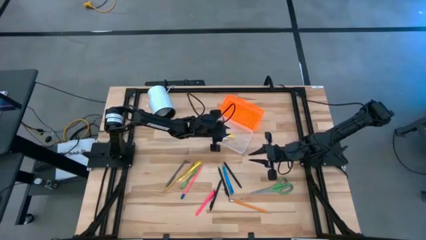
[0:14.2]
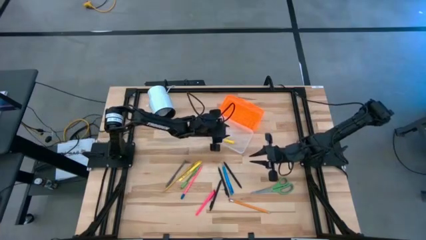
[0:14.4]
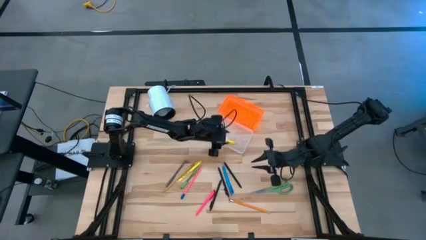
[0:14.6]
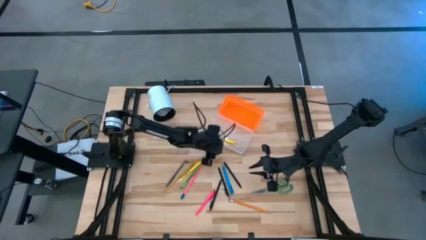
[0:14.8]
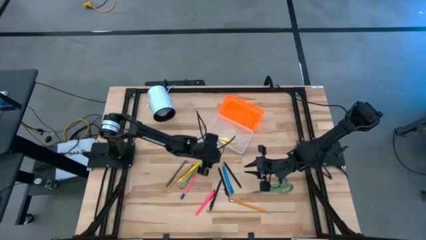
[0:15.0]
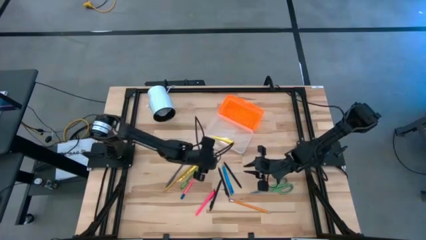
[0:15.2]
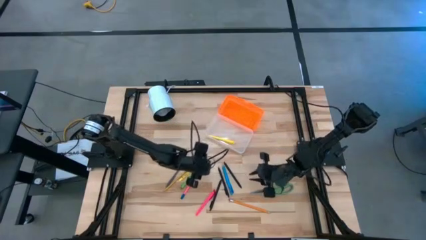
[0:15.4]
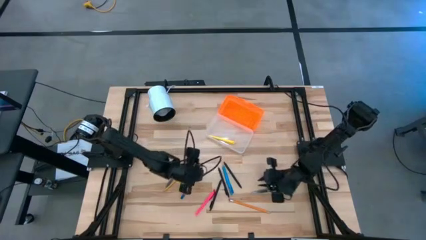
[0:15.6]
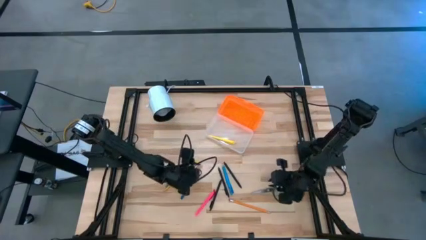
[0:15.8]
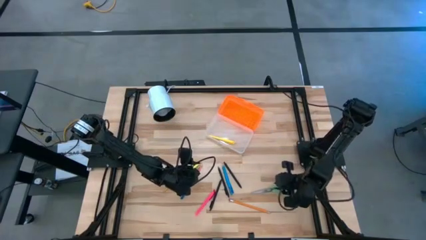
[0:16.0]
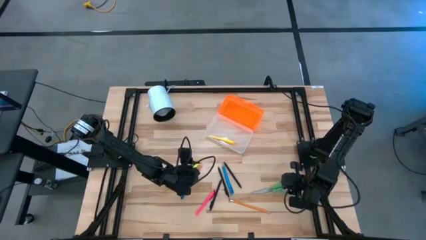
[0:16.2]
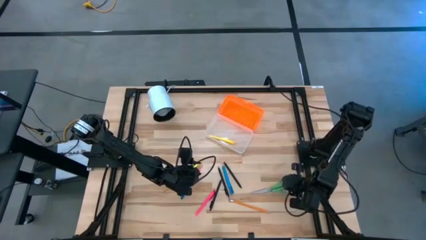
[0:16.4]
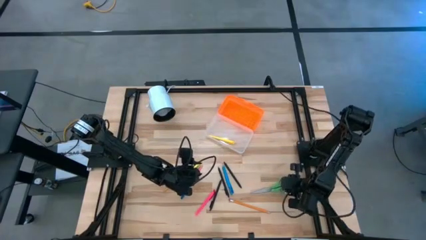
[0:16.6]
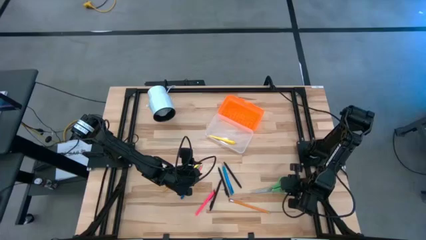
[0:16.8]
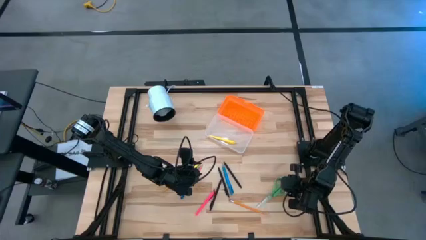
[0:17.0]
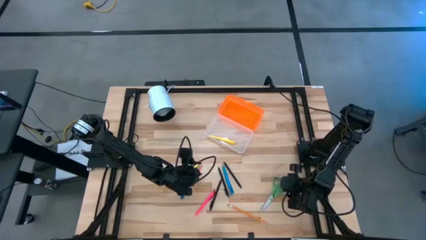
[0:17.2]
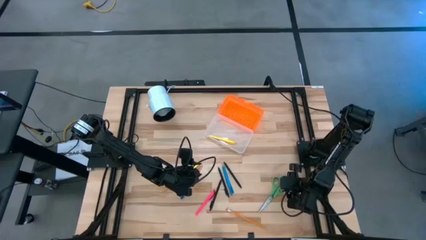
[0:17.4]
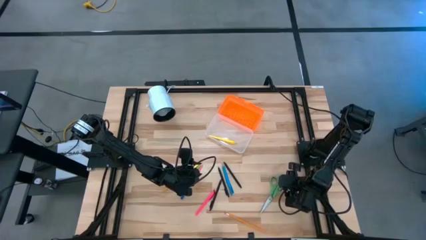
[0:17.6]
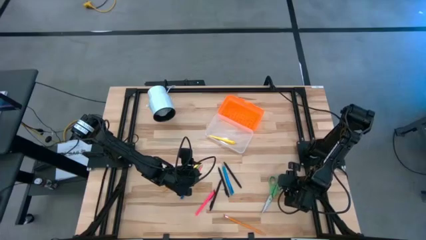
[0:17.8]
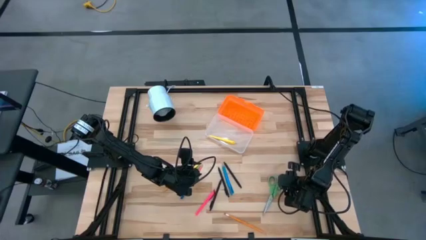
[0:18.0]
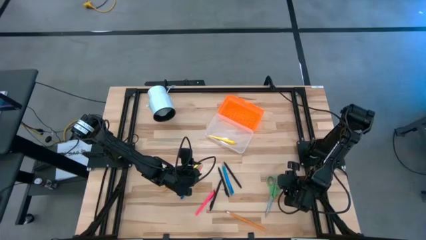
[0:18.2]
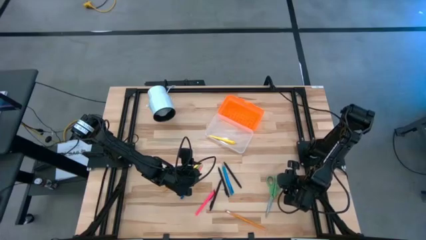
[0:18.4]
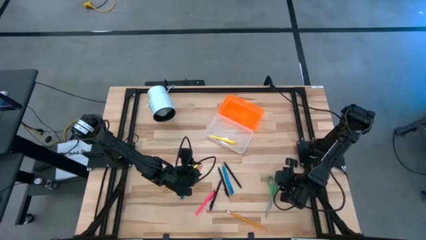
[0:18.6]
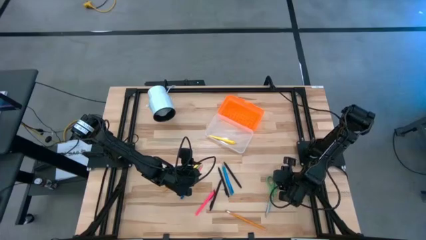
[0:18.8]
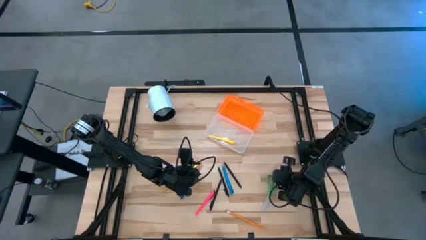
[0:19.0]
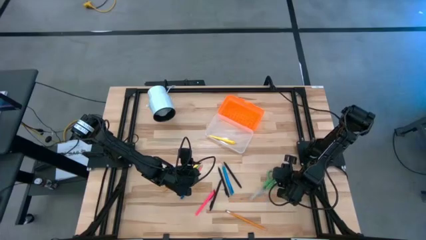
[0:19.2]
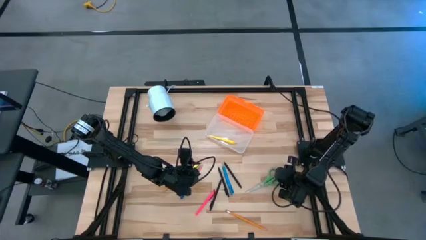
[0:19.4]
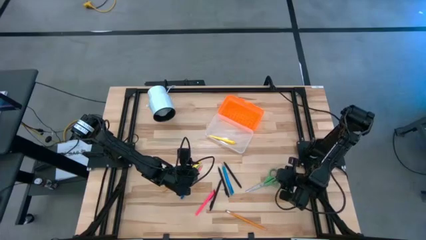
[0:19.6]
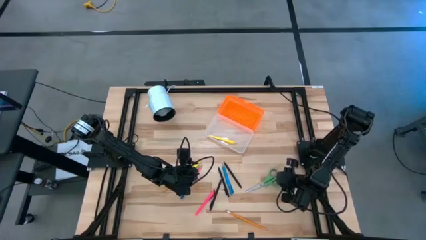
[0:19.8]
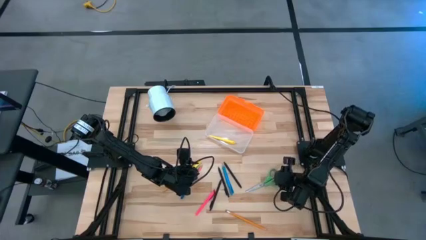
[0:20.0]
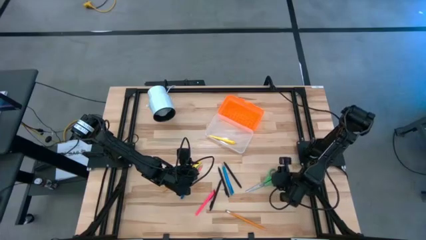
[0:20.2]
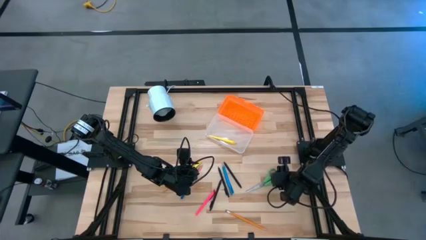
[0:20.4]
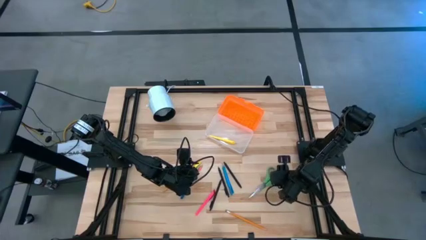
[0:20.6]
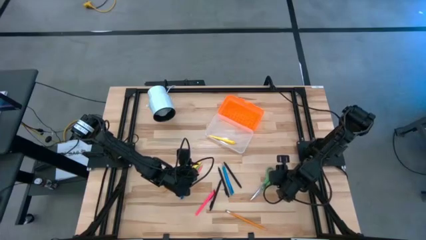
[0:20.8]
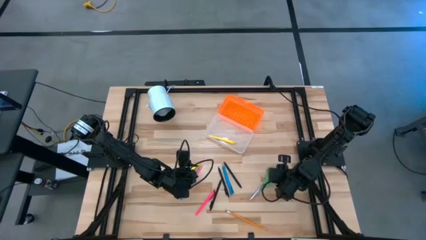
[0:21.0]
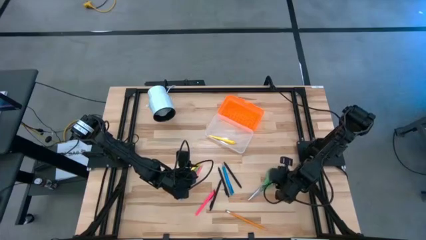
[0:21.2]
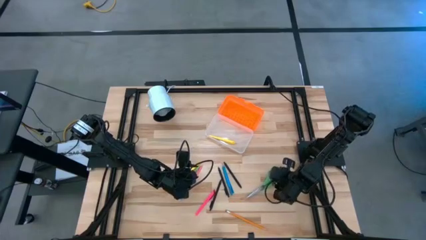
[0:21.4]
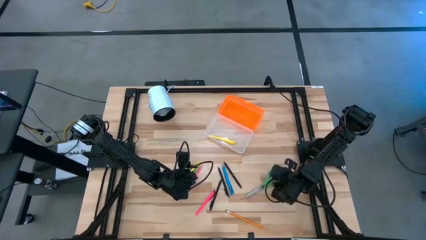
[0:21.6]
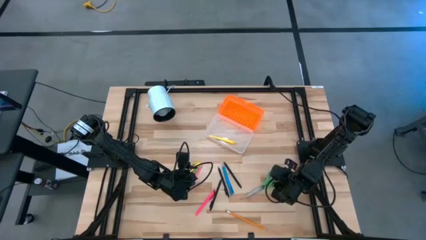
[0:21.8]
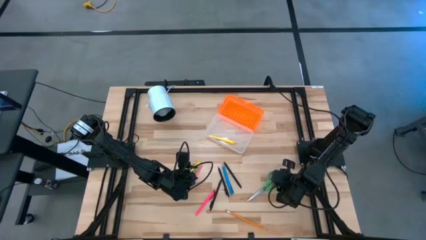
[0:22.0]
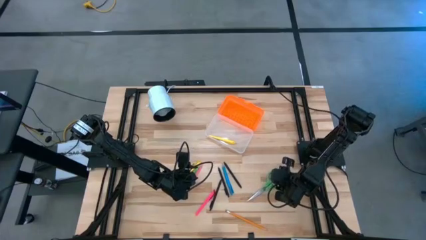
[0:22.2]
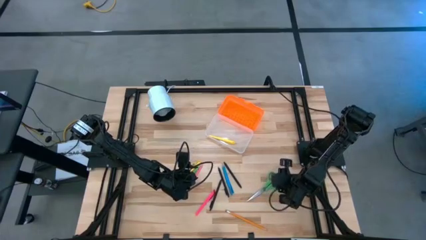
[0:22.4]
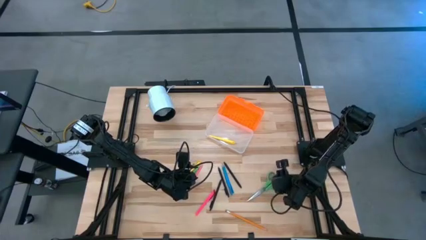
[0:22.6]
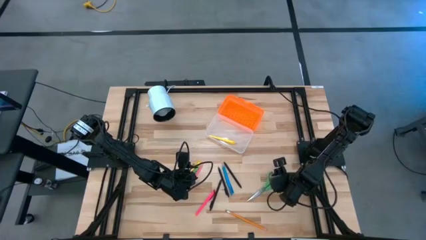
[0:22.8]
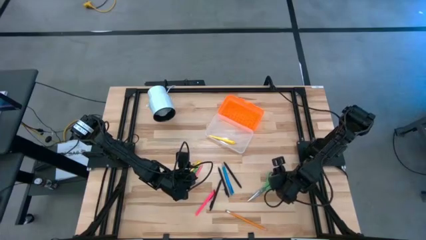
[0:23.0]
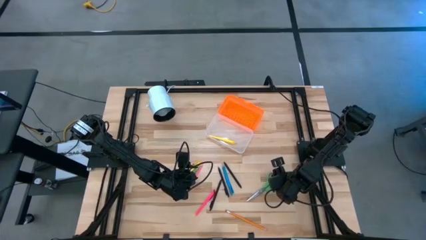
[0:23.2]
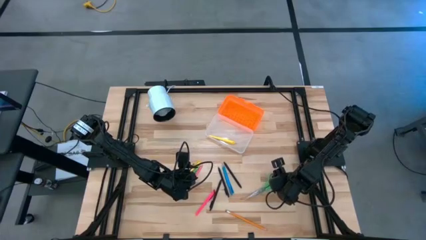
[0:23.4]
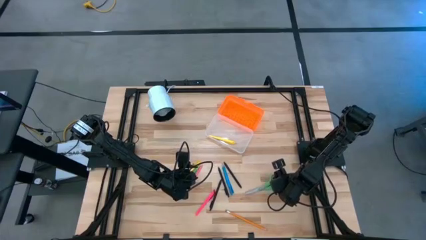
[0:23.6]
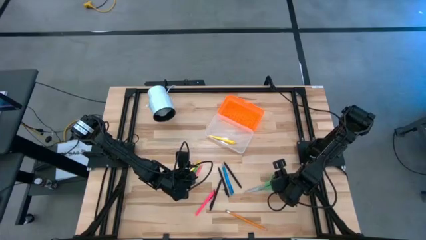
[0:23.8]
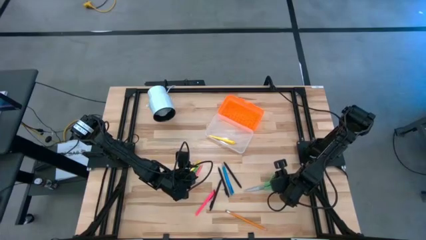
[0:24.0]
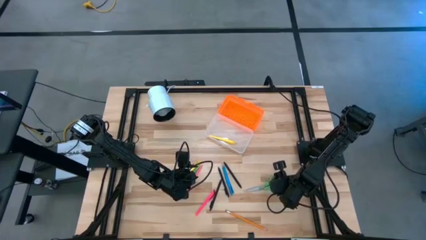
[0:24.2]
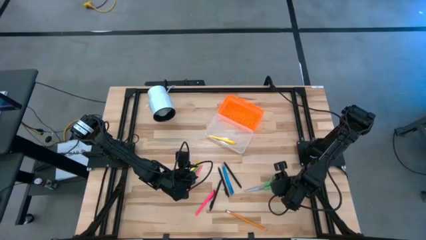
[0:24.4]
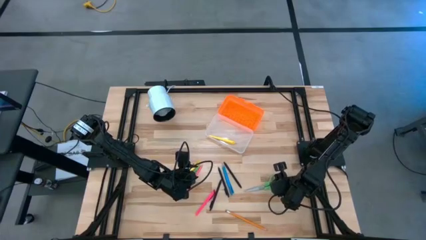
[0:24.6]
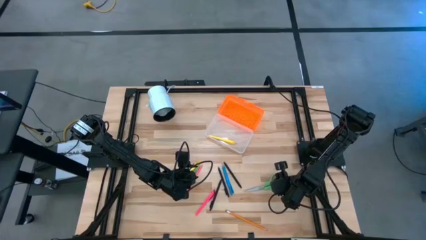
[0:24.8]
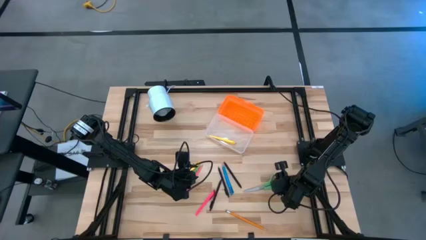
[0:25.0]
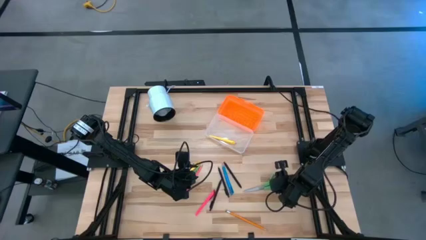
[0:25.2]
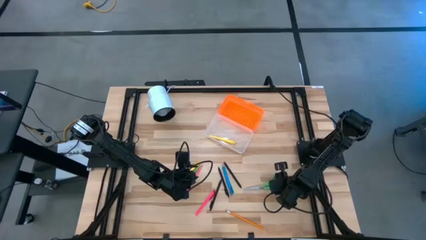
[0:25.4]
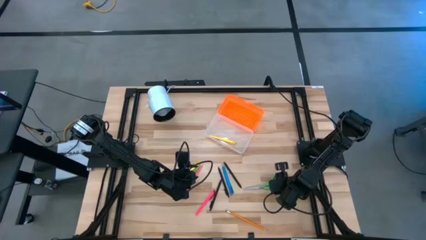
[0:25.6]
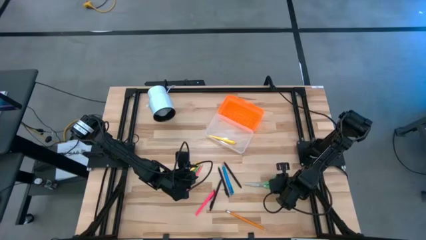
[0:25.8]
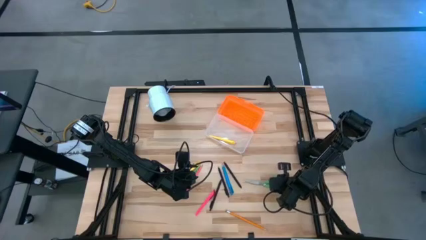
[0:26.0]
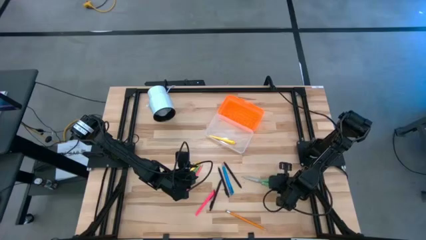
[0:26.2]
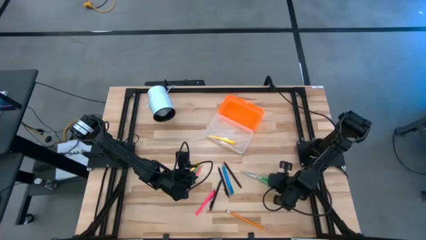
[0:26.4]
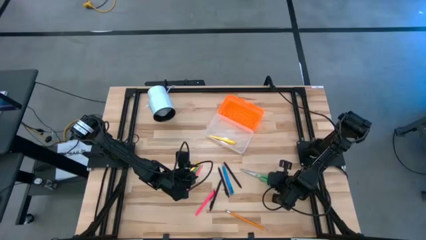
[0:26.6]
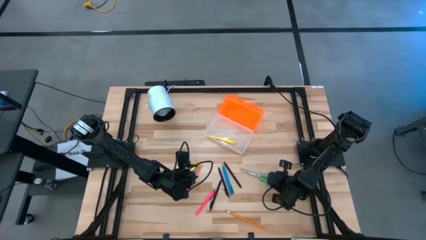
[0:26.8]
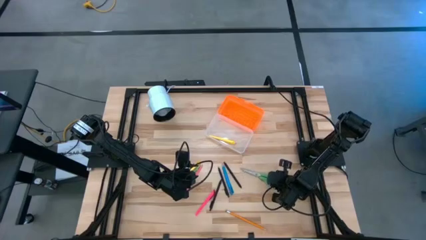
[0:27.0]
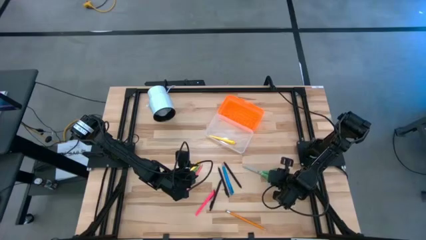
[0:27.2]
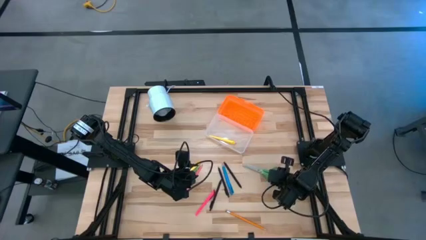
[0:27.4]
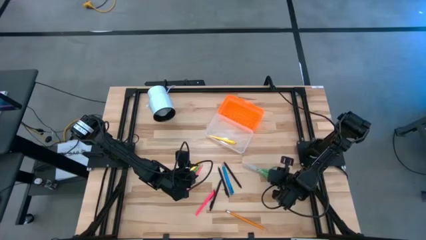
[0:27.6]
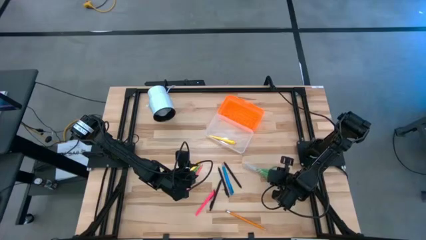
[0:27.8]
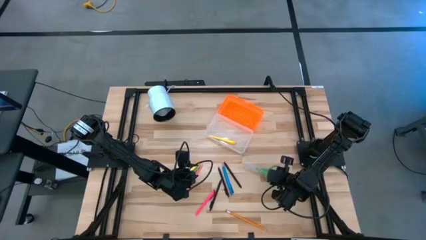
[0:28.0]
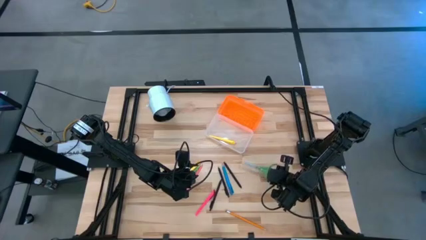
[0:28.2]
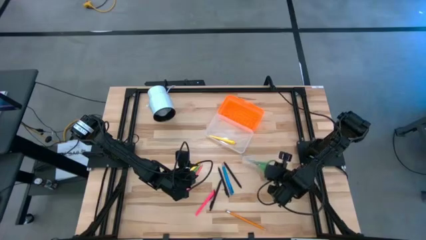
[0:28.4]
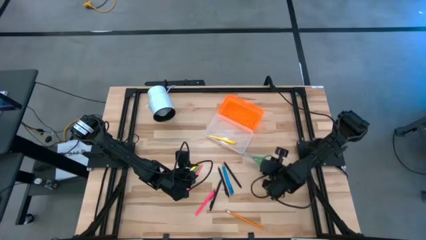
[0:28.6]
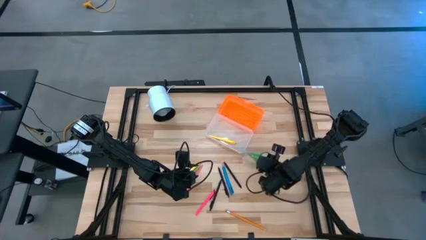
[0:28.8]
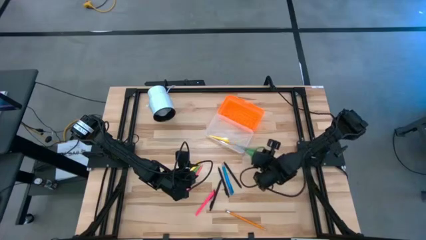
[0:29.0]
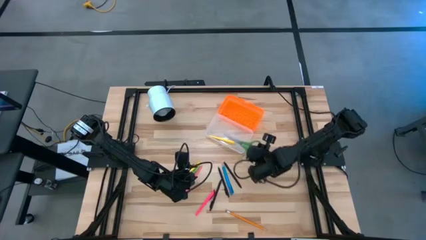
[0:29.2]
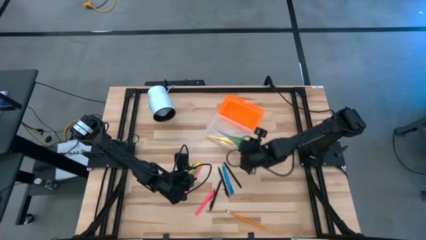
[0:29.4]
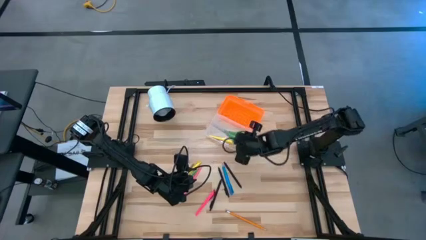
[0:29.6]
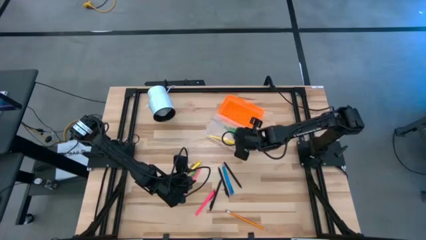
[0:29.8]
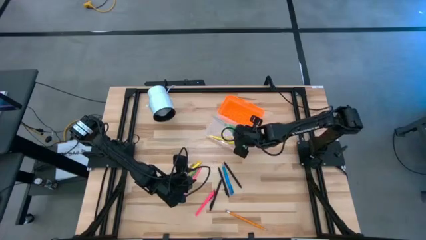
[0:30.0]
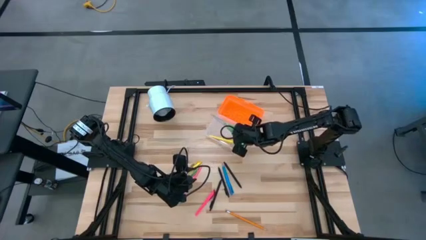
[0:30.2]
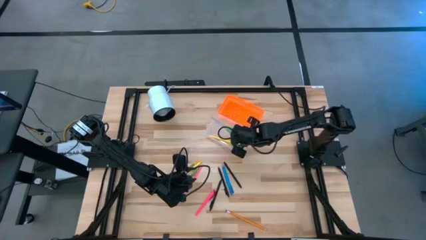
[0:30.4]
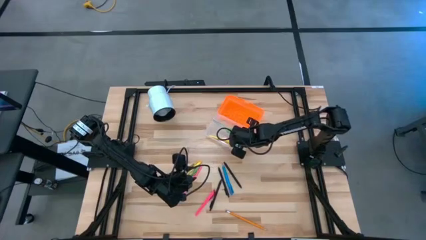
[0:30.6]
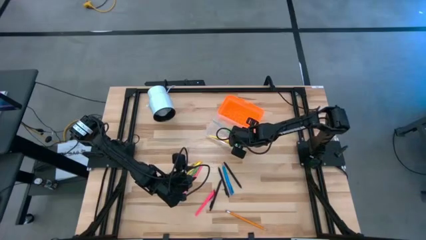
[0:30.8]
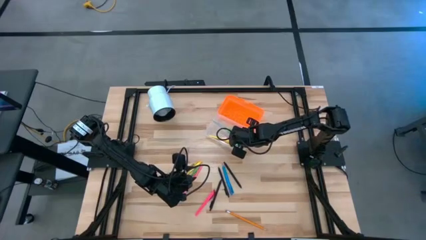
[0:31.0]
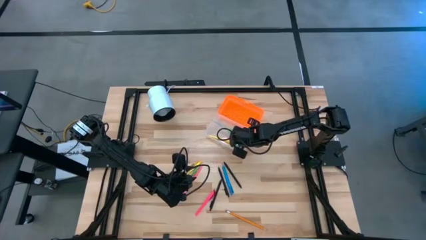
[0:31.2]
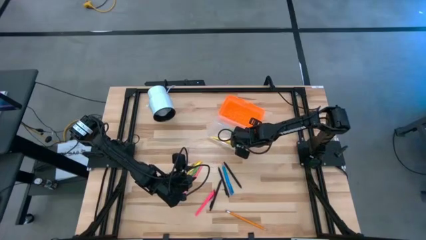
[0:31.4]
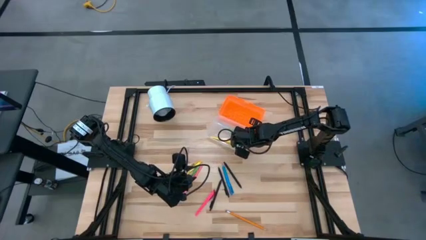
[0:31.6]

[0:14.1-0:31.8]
Task: Pick & place school supplies into a supply box
Put the green scissors into the supply box
